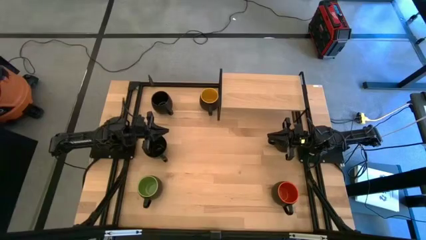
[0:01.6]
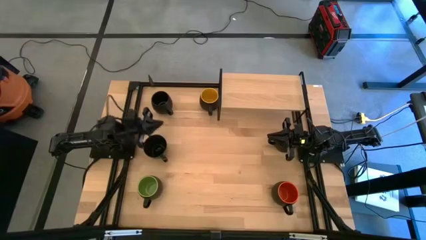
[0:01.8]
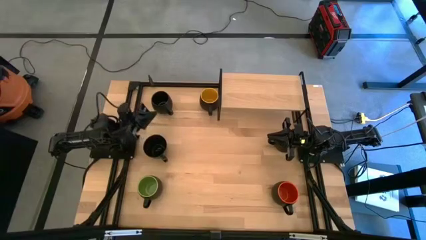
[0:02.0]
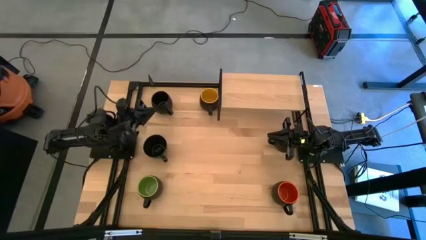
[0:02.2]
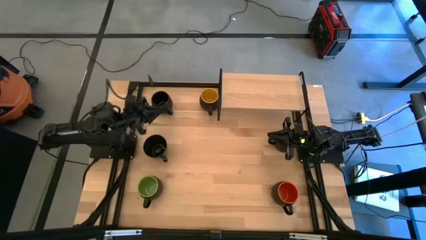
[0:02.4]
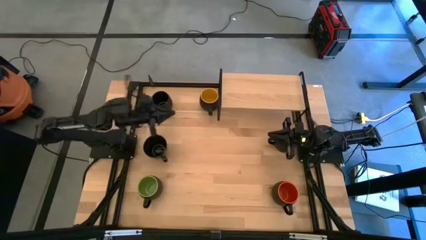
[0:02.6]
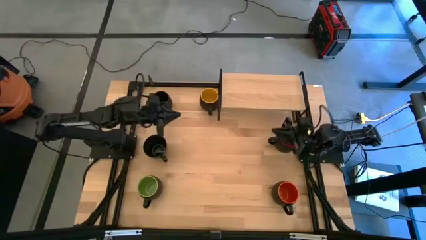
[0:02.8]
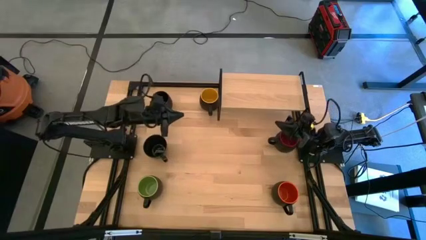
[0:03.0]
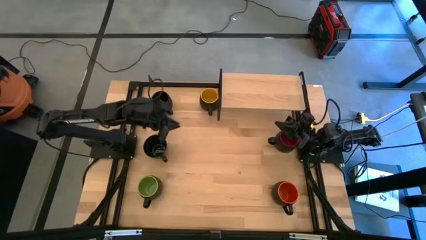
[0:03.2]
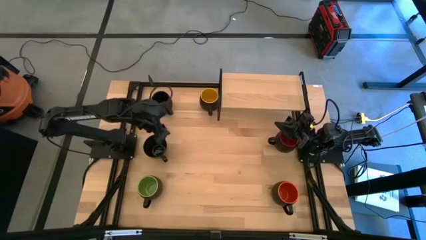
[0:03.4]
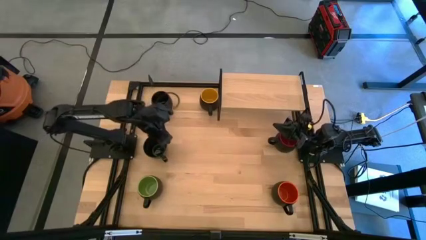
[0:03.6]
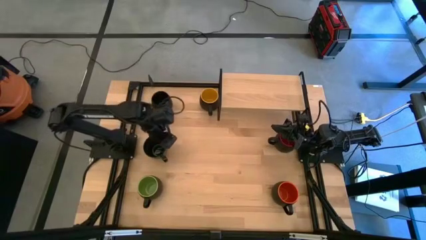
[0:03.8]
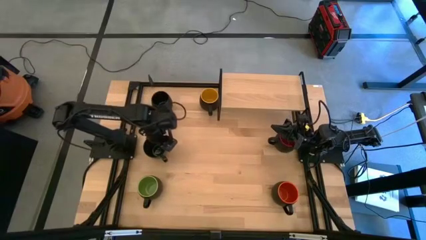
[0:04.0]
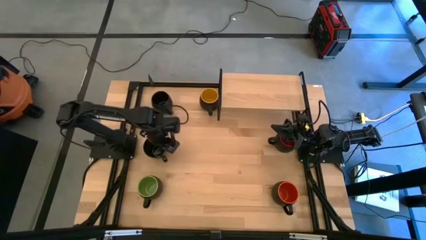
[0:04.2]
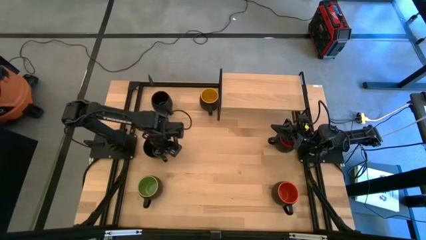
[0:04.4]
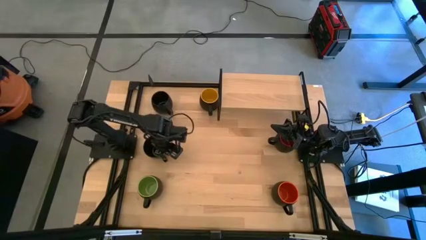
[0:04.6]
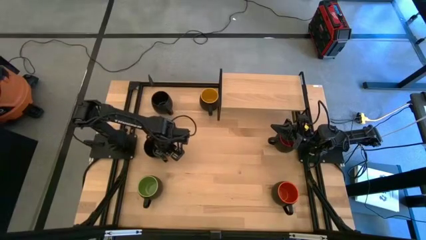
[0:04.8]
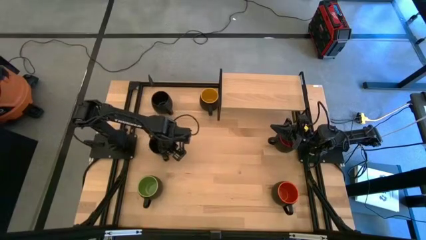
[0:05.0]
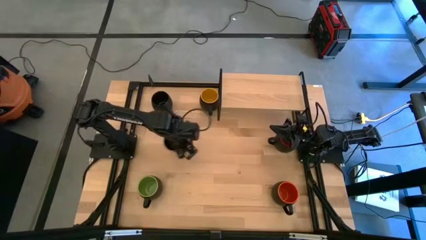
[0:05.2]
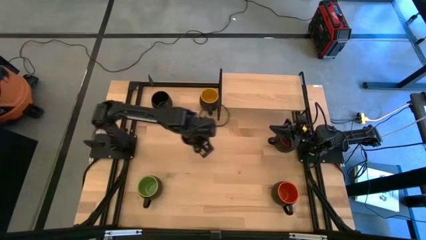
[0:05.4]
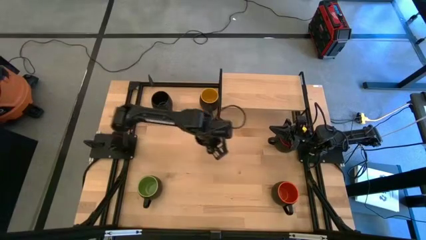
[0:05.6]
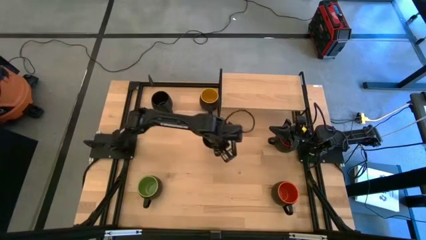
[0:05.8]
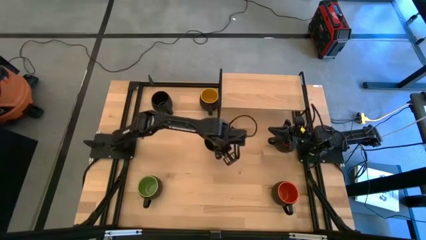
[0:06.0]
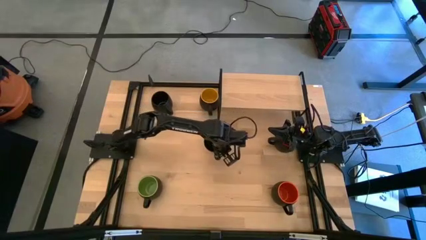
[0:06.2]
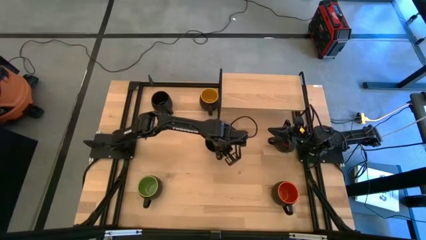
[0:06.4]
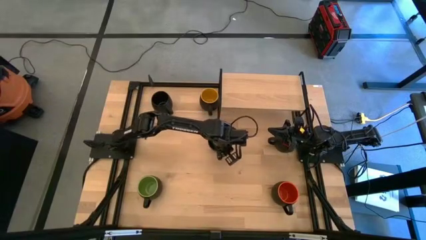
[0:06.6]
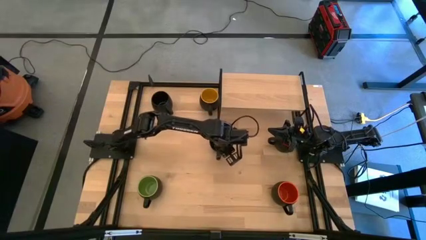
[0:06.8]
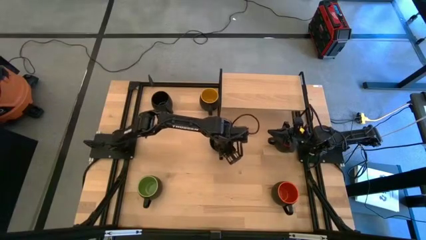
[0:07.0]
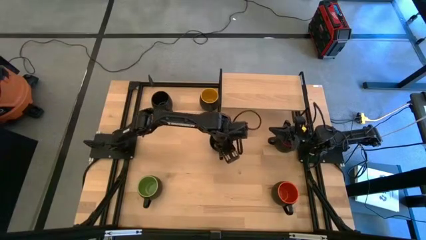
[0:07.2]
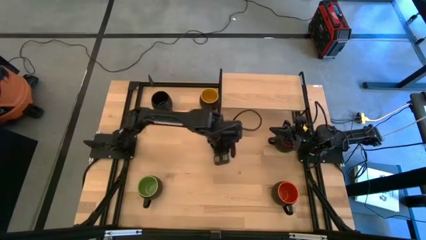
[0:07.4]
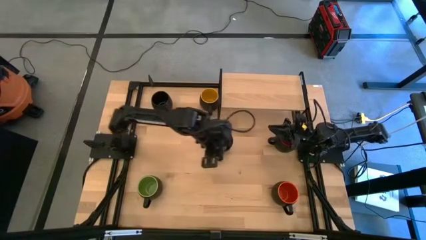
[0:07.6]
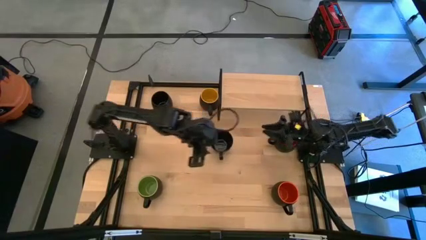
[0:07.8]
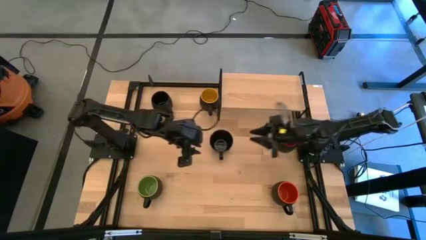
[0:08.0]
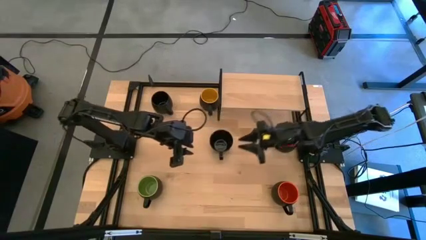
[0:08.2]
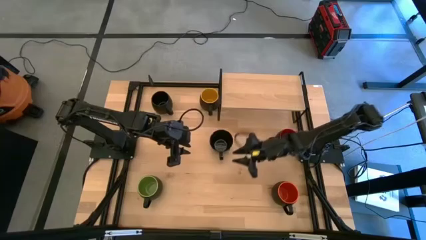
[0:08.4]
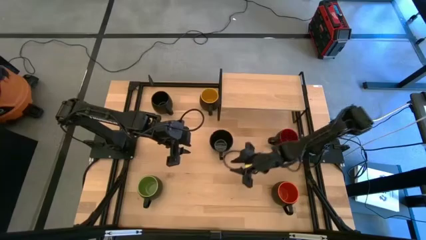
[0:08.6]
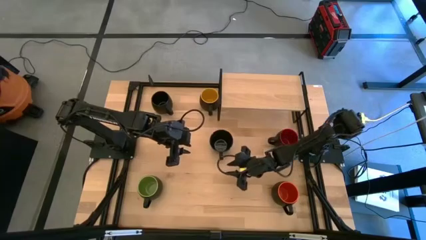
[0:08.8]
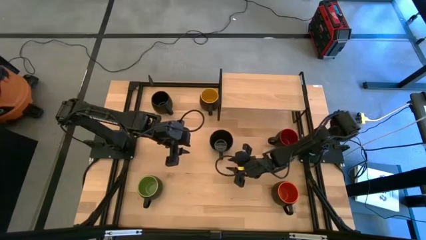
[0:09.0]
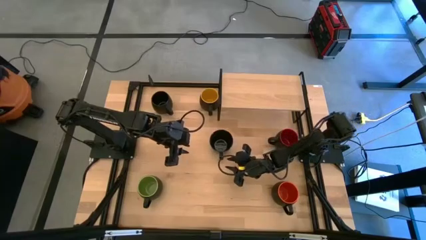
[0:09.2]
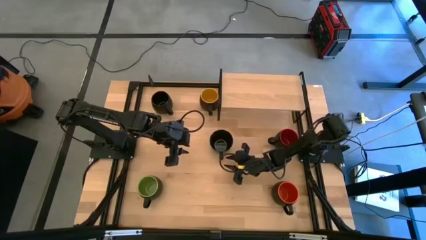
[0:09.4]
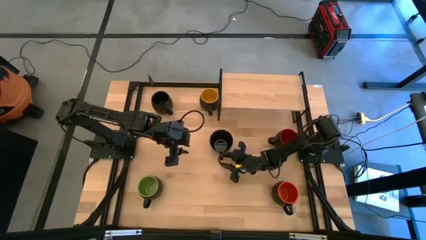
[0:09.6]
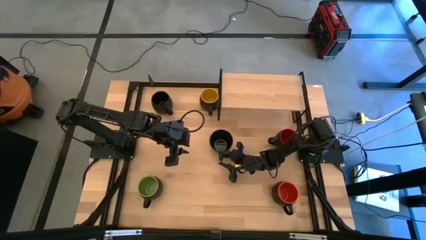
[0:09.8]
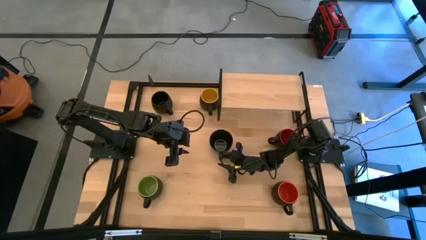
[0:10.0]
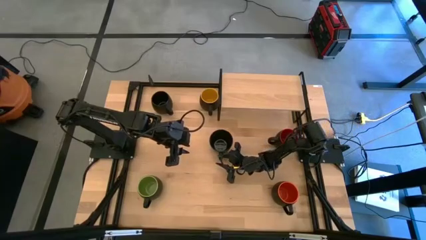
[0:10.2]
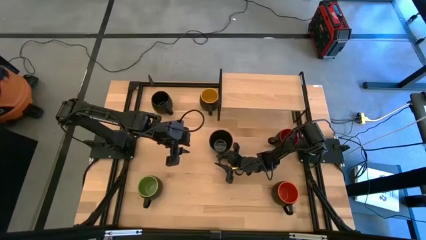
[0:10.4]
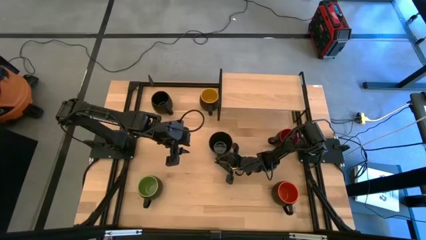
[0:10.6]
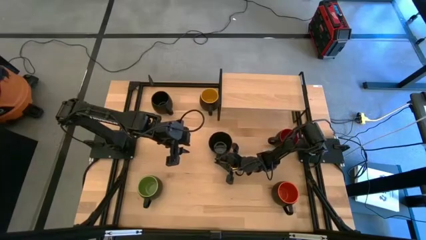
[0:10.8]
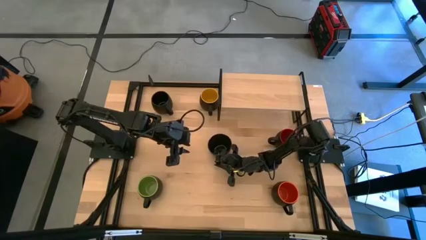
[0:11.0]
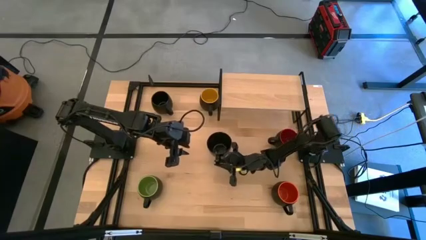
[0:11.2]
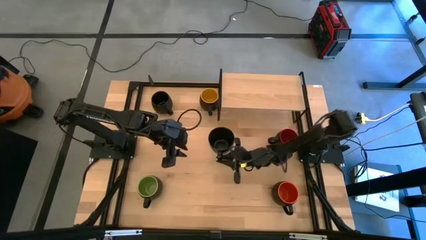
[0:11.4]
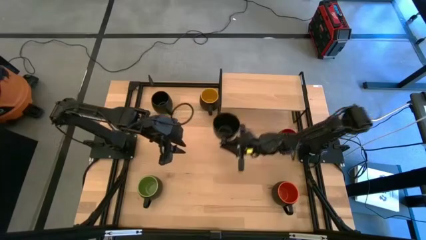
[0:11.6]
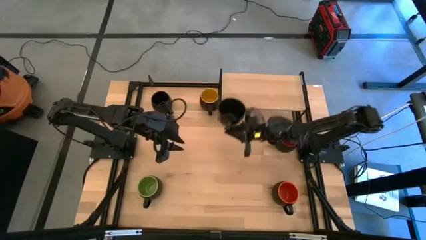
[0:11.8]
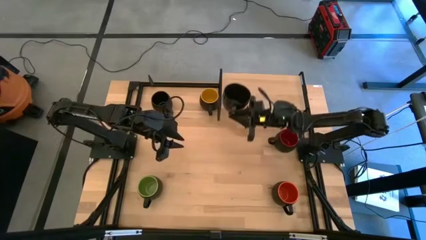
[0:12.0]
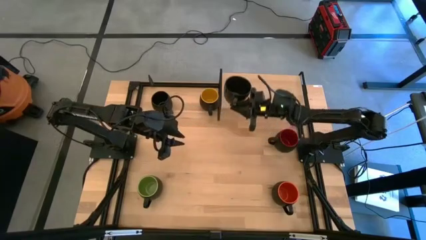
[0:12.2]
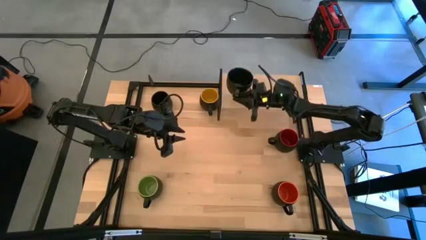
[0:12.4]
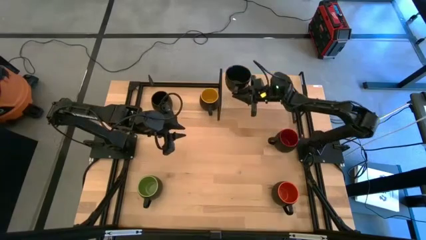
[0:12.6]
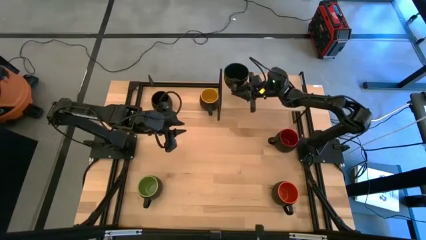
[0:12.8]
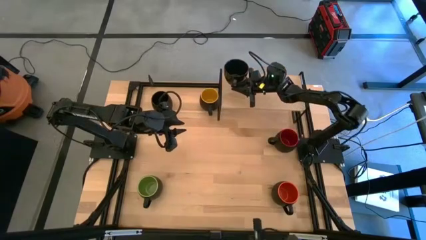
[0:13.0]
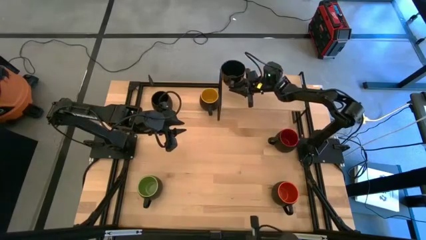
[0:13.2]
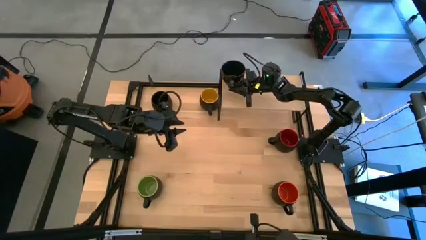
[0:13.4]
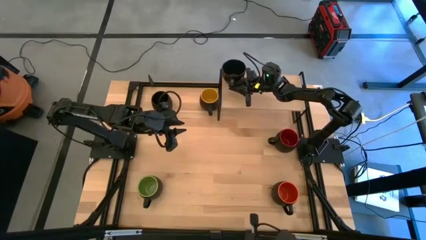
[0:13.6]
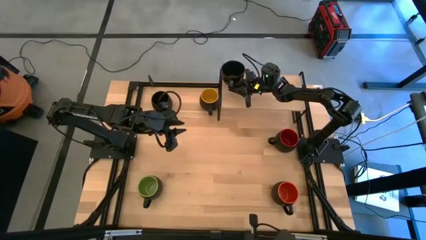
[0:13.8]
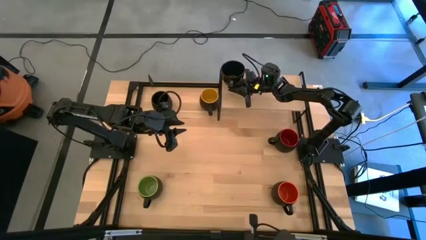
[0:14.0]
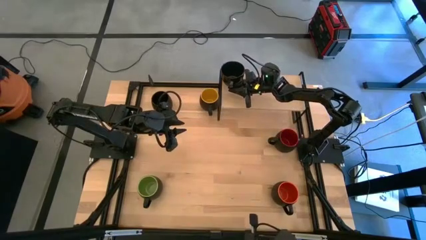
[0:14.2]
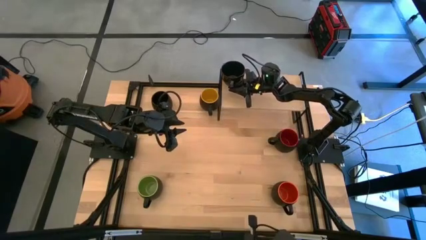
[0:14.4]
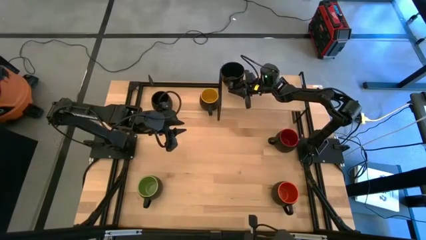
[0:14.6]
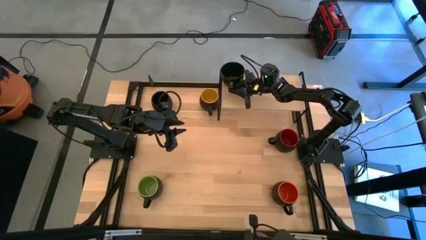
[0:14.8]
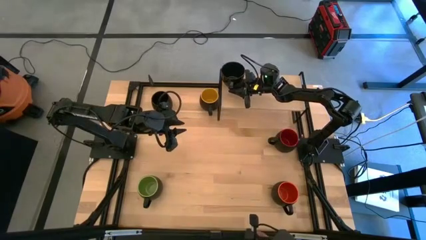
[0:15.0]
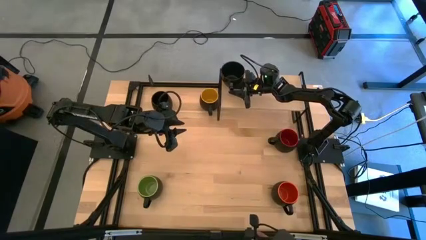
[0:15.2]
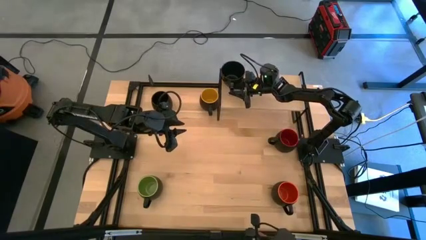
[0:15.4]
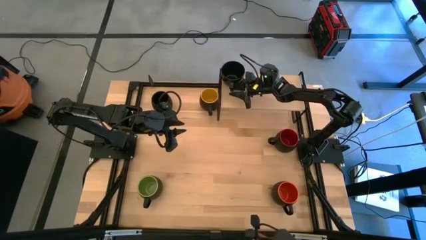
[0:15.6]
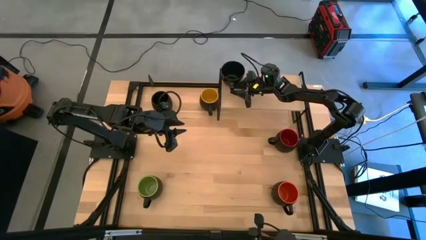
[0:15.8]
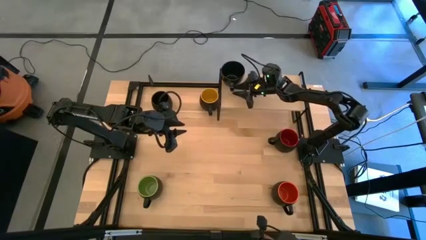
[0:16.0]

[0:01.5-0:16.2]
Task: Place coffee mugs
Put the bottom black mug on the shelf
